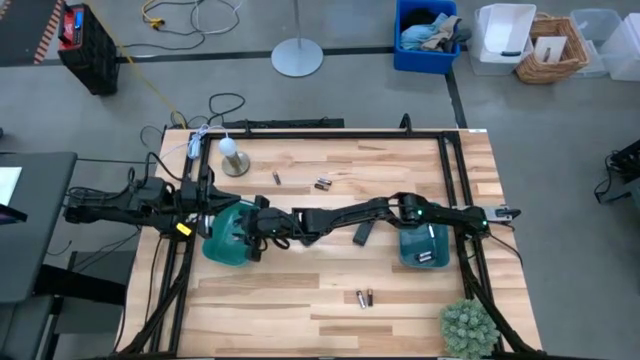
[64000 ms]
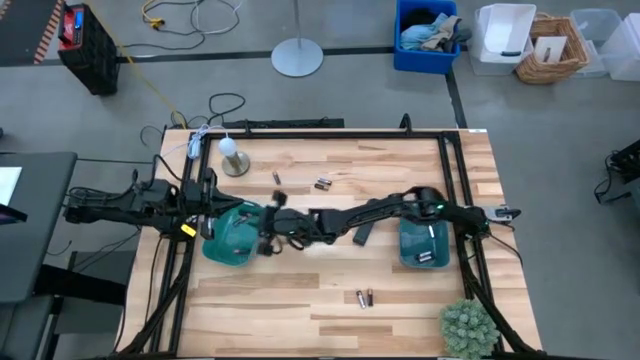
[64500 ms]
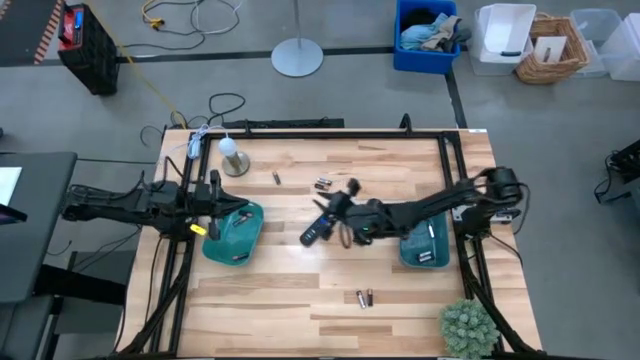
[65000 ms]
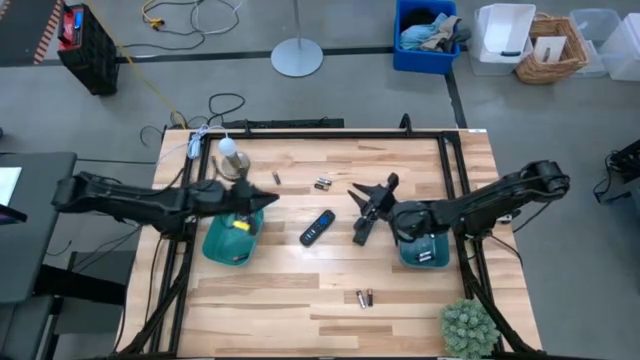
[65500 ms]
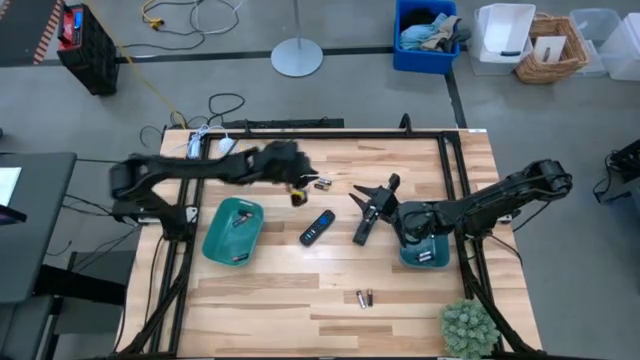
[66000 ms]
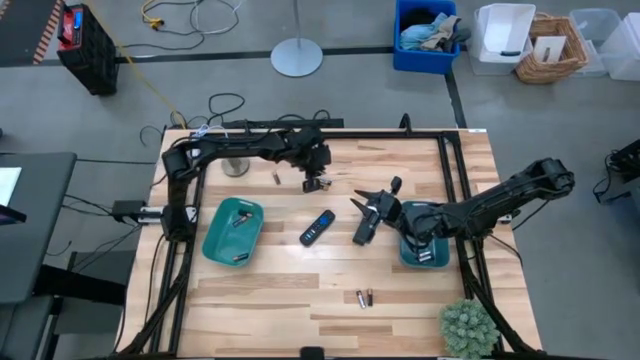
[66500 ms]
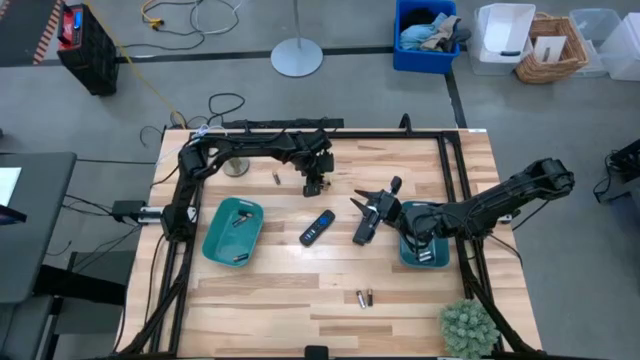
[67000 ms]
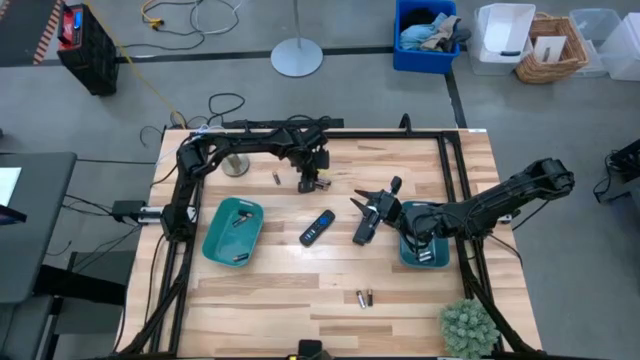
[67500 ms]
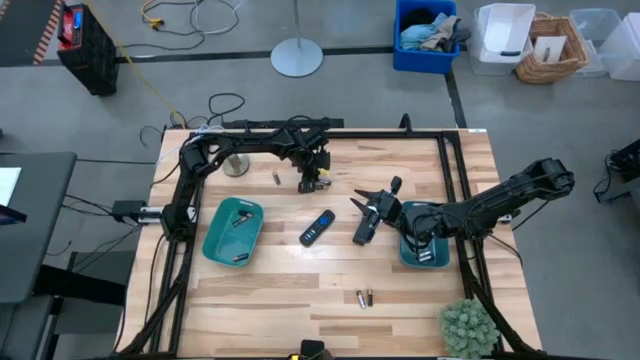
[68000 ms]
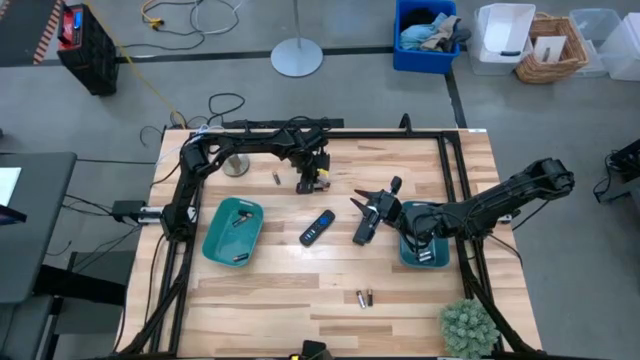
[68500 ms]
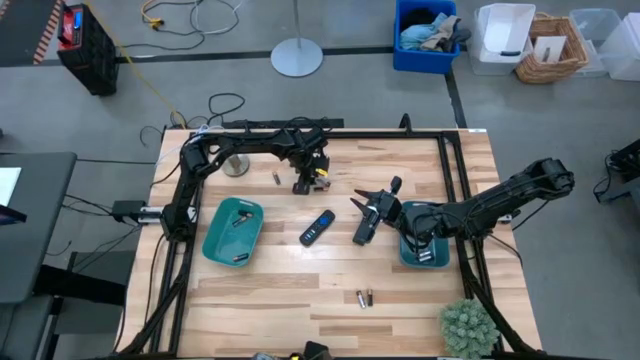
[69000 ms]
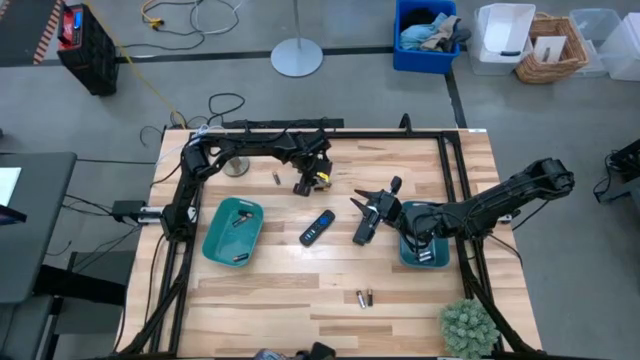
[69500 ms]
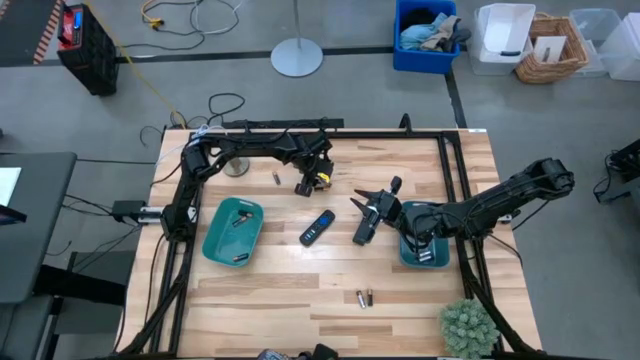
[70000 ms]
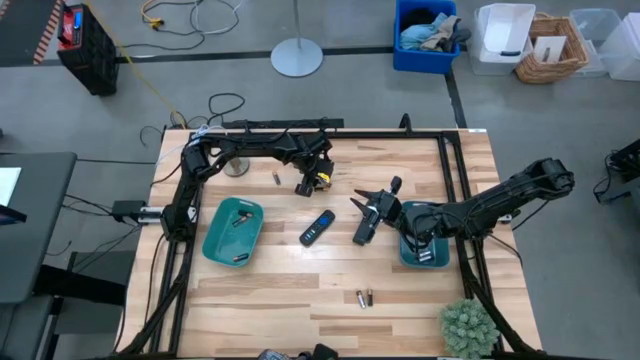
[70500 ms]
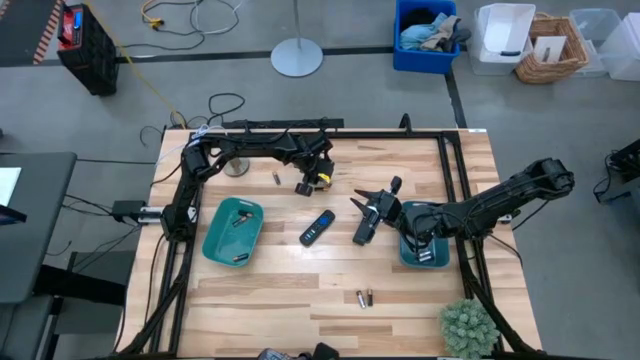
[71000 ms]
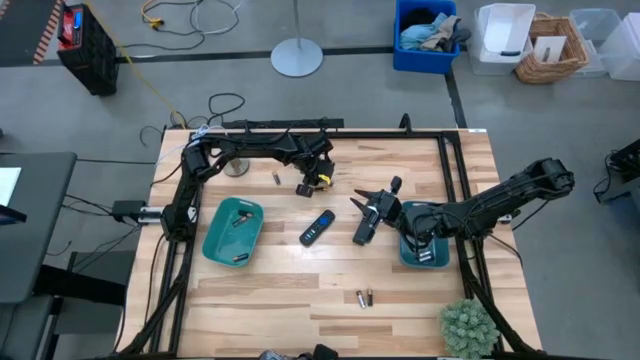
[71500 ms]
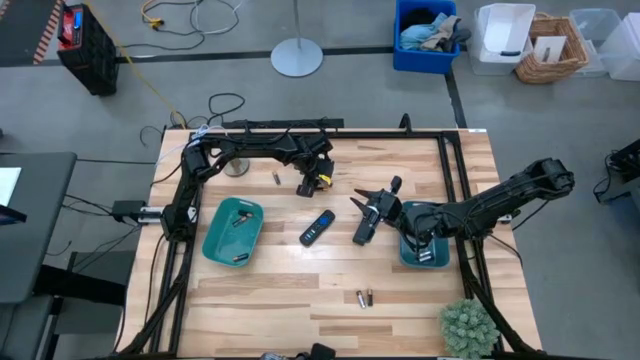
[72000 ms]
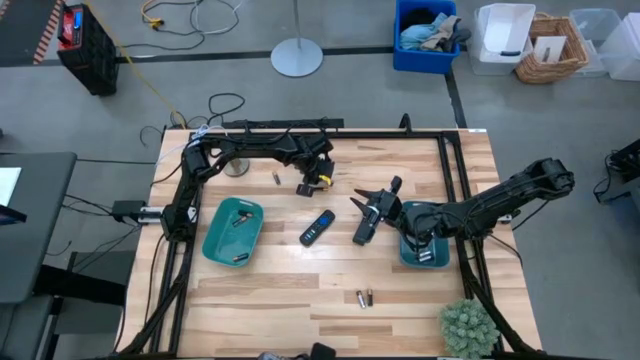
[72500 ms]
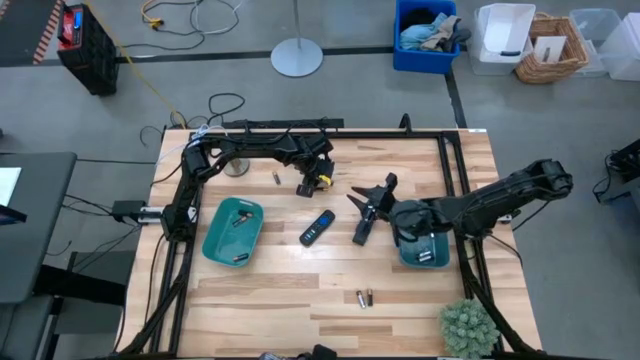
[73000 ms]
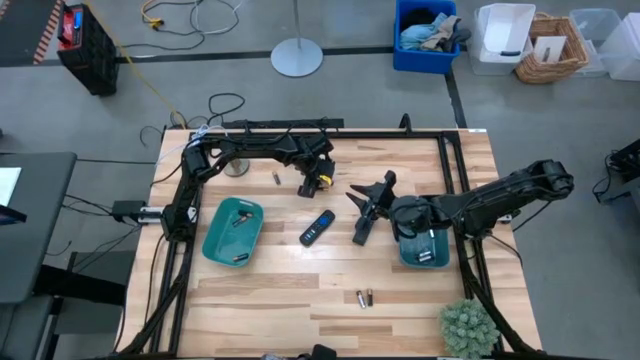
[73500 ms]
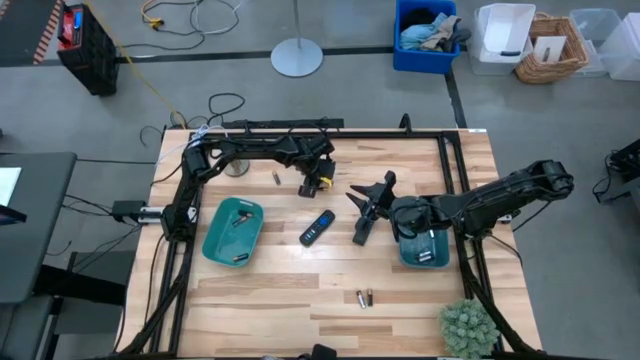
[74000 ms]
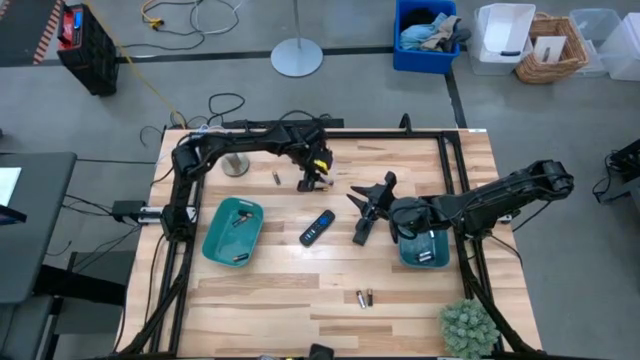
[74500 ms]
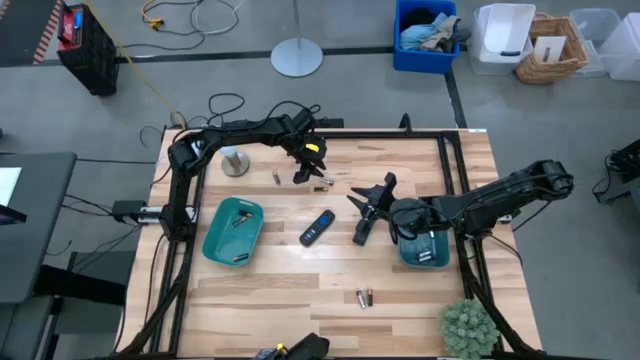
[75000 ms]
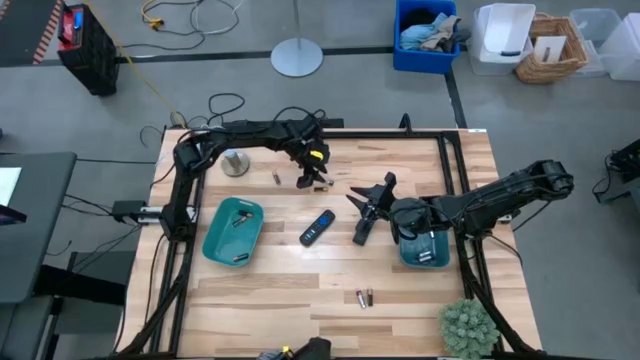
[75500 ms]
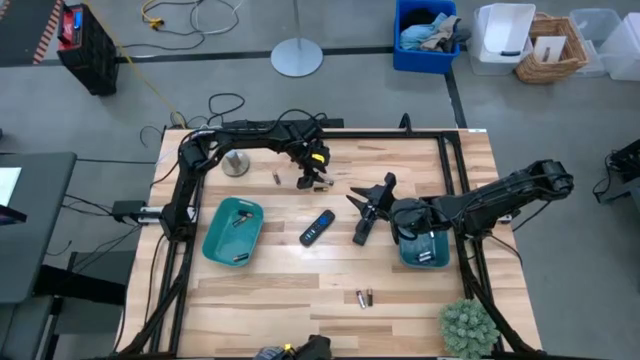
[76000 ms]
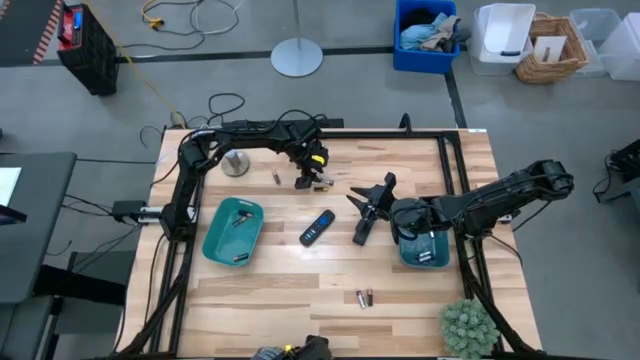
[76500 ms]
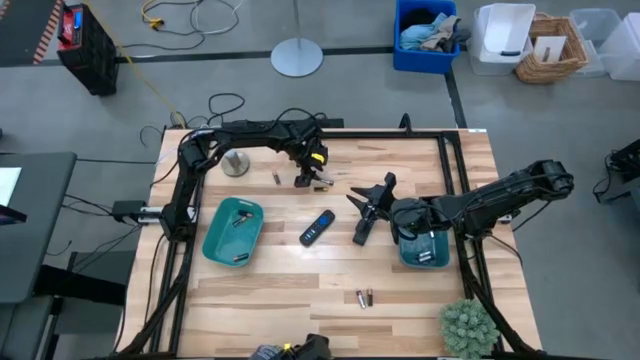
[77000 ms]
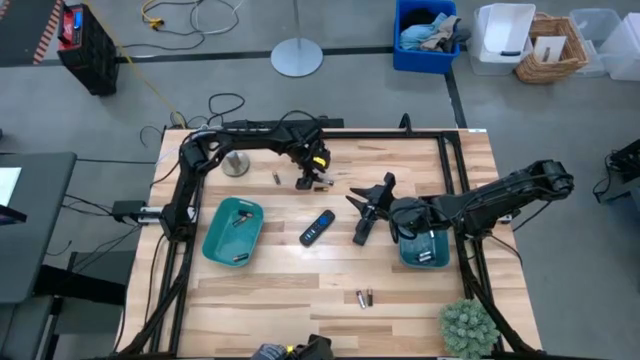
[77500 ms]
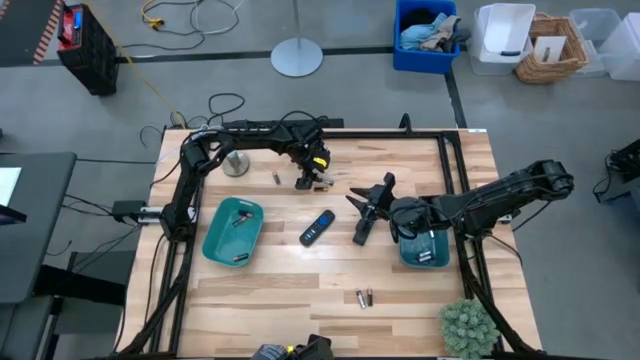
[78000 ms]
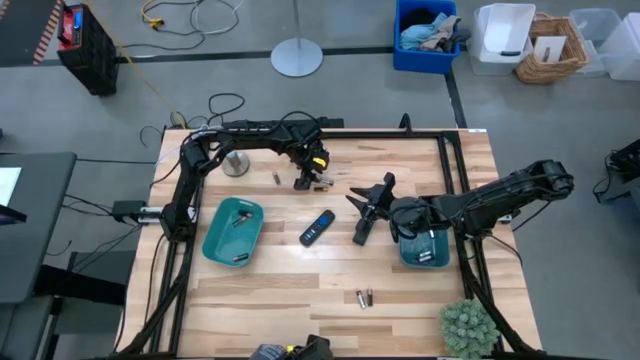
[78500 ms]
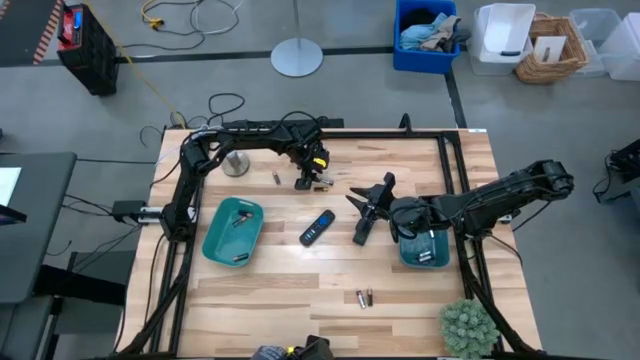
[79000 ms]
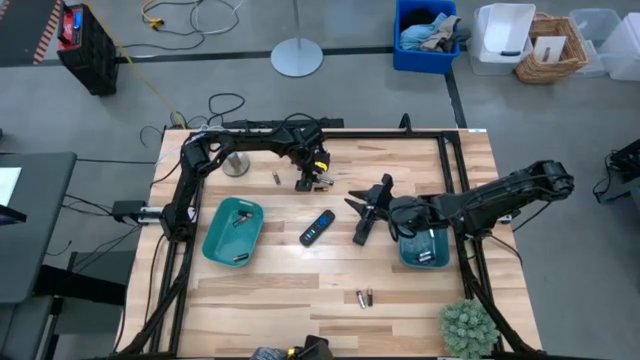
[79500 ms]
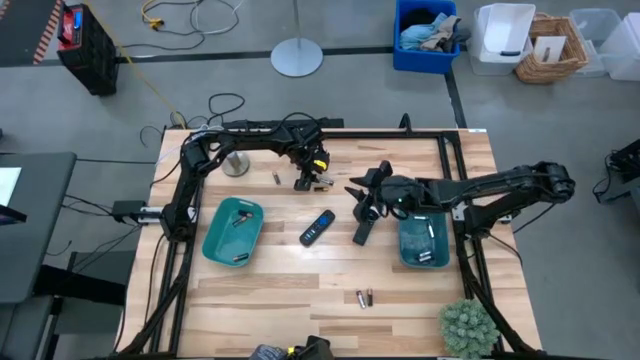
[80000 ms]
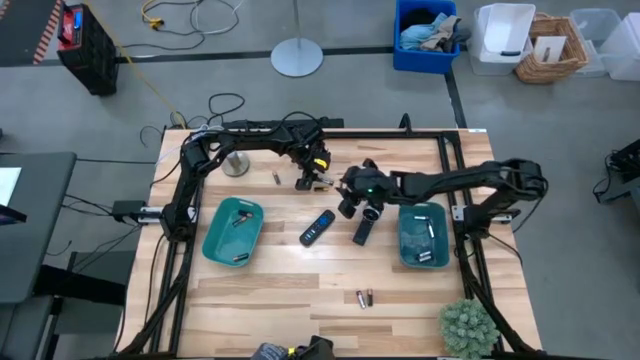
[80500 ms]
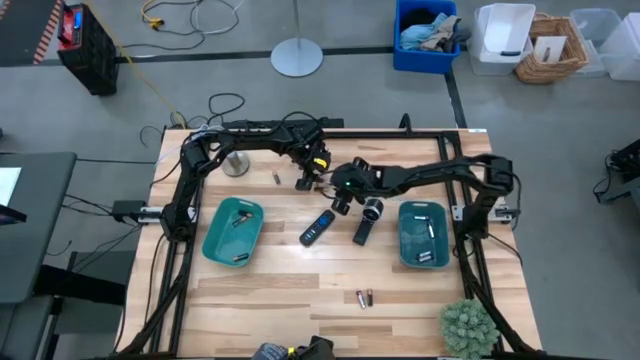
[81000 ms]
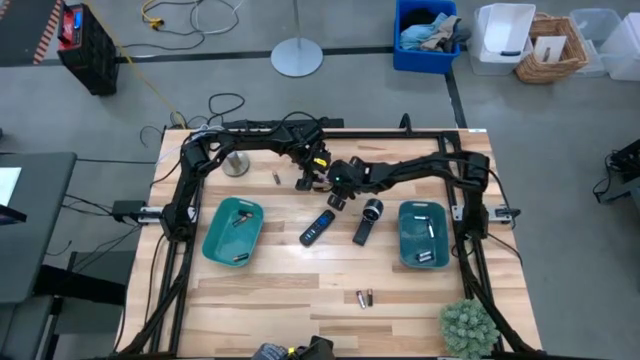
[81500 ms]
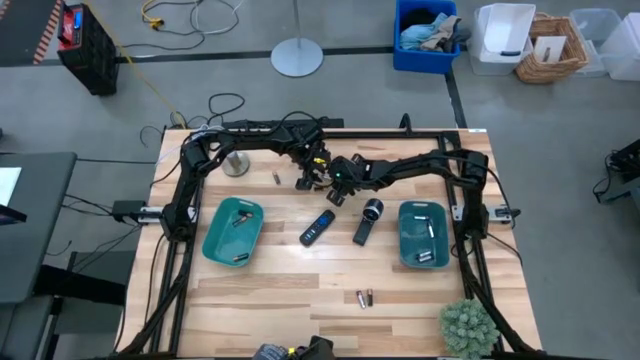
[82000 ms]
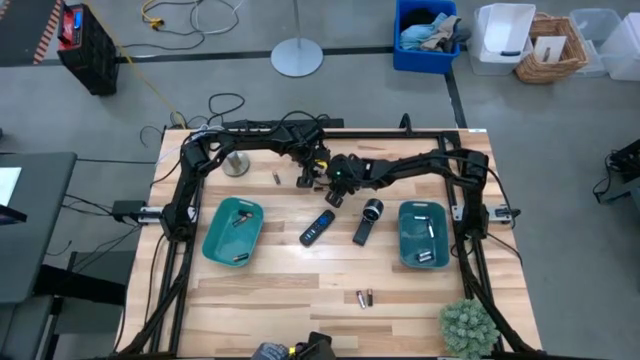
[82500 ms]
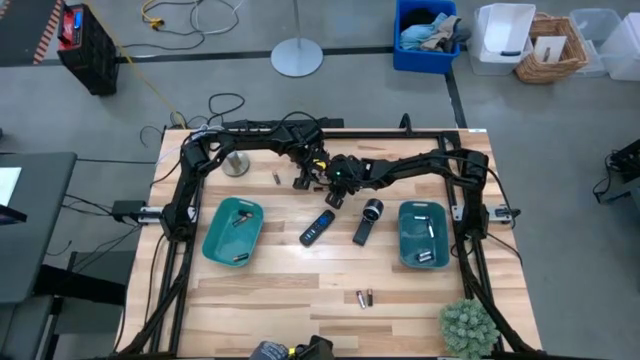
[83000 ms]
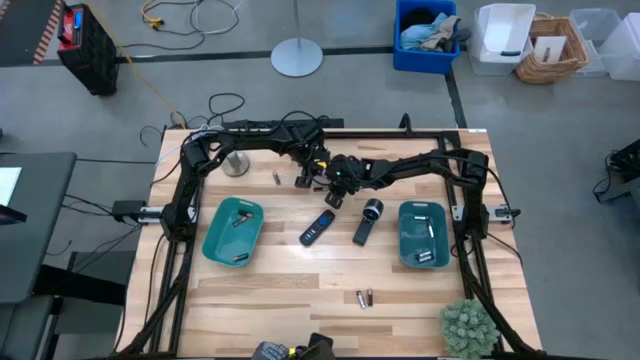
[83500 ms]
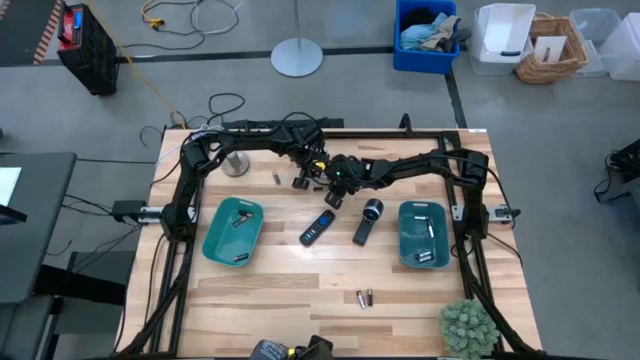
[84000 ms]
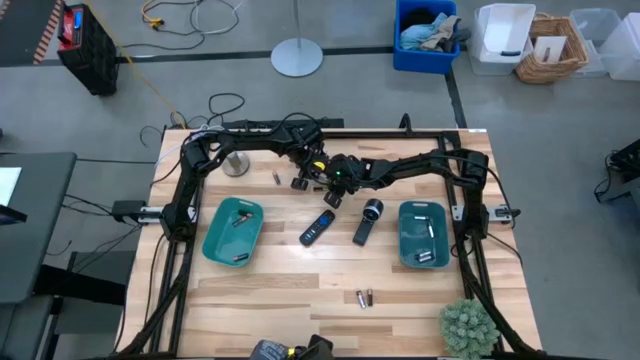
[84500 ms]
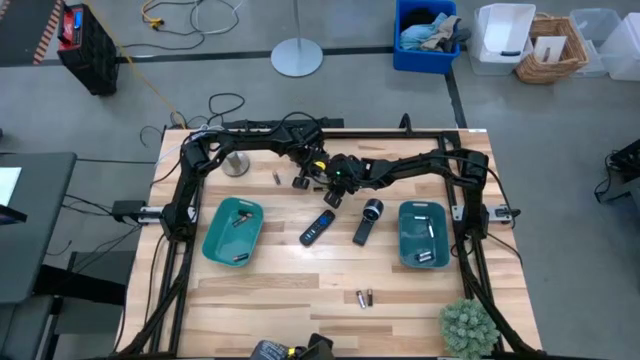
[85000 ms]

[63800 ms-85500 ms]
Task: Sort batteries
Put the silver battery into the blue bin
